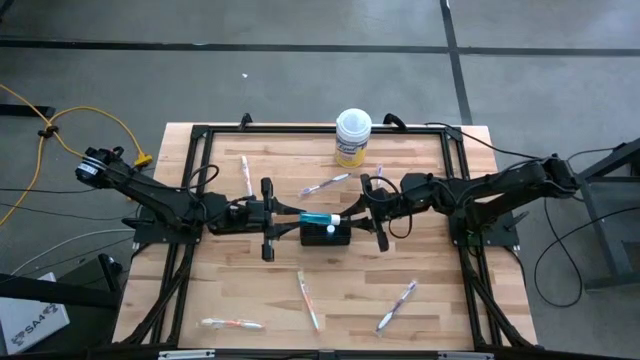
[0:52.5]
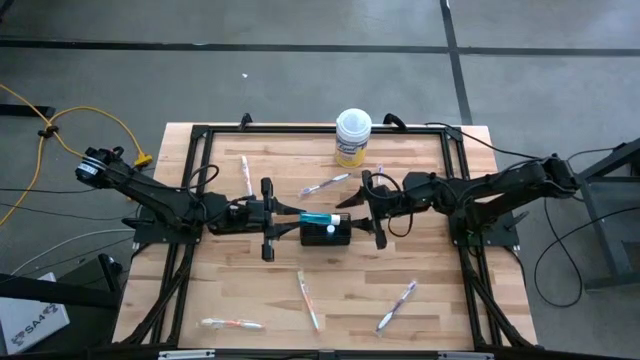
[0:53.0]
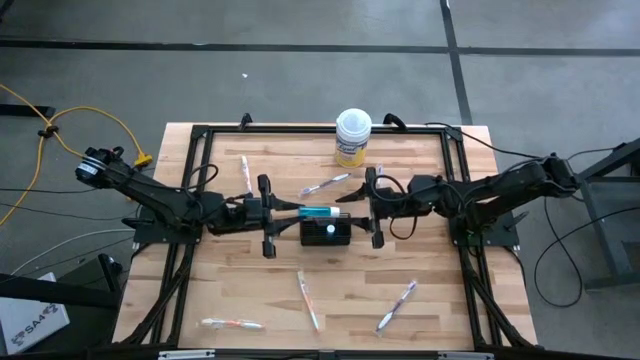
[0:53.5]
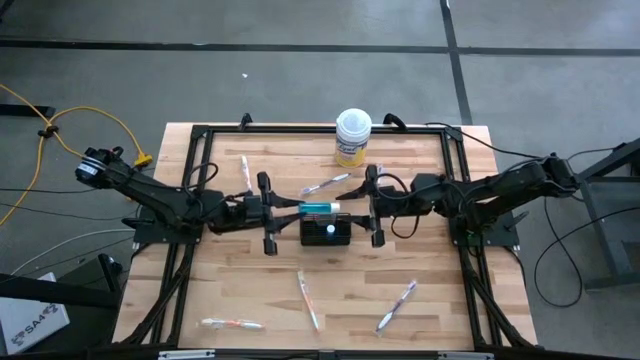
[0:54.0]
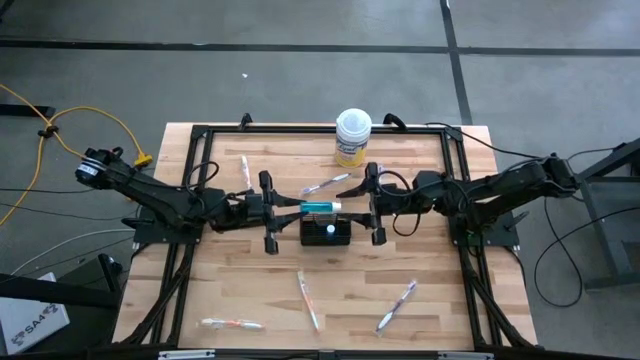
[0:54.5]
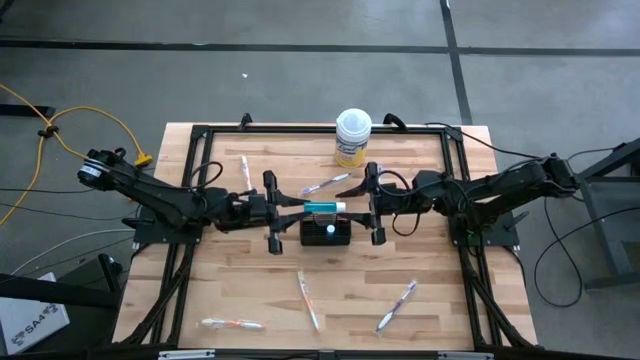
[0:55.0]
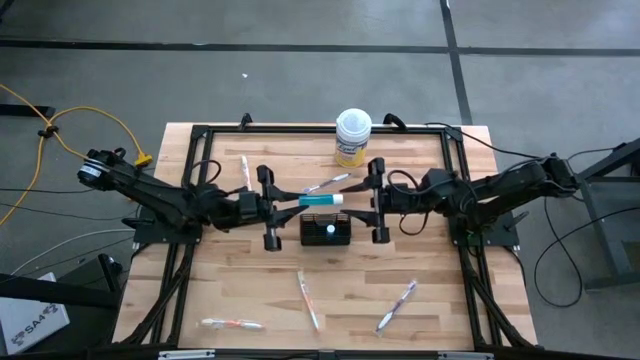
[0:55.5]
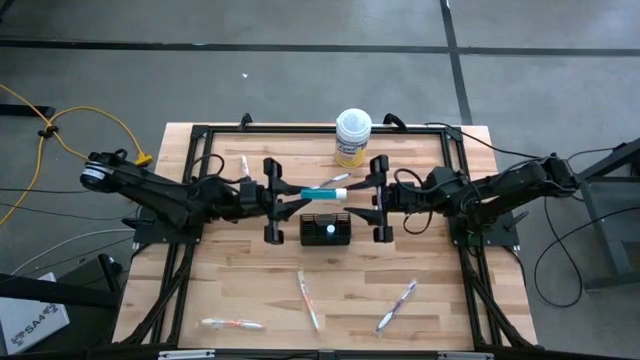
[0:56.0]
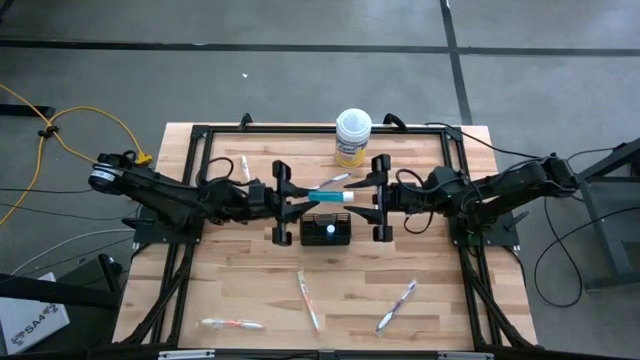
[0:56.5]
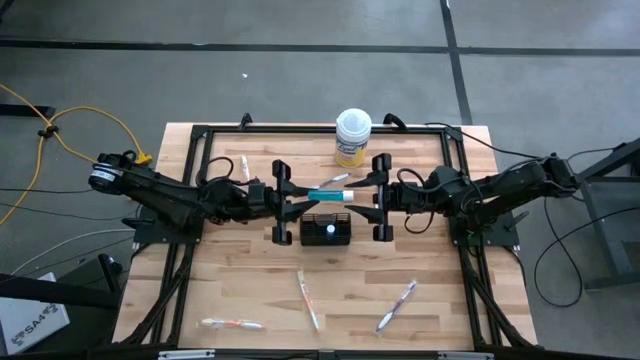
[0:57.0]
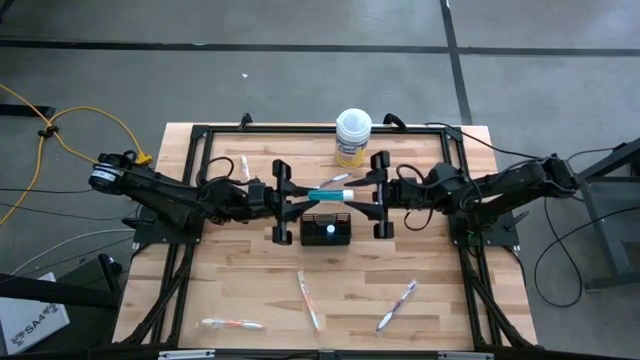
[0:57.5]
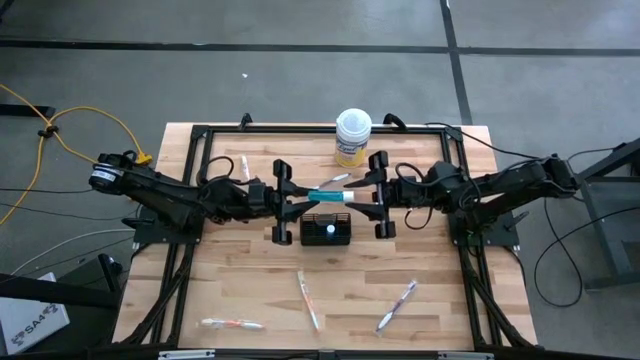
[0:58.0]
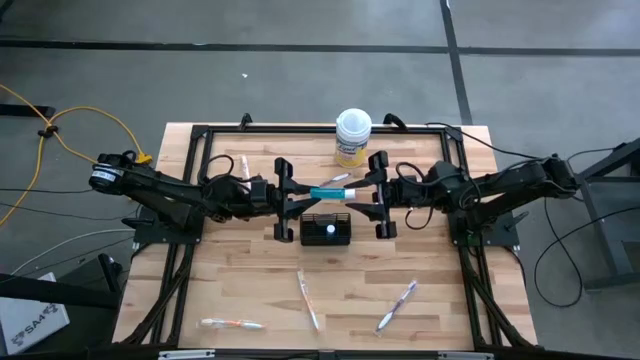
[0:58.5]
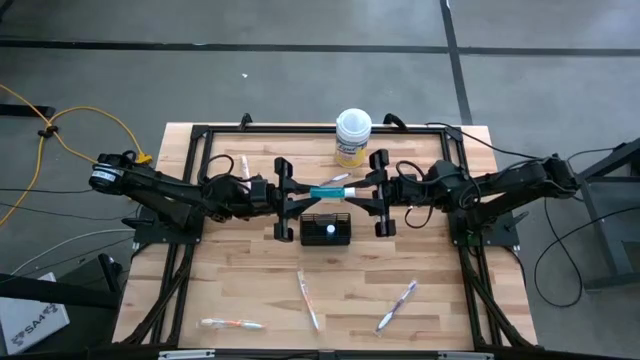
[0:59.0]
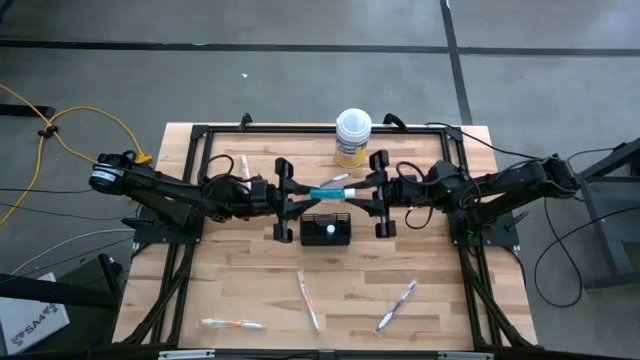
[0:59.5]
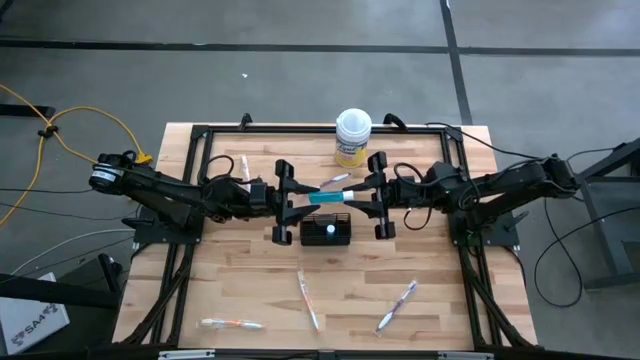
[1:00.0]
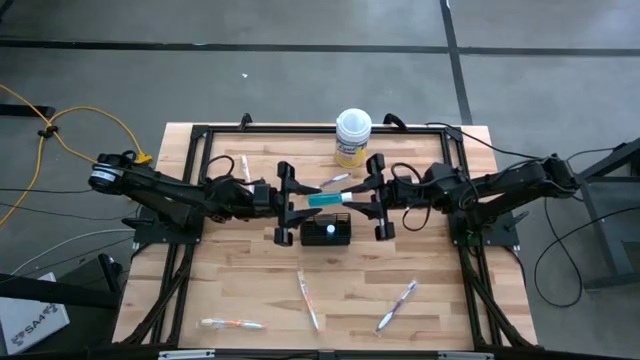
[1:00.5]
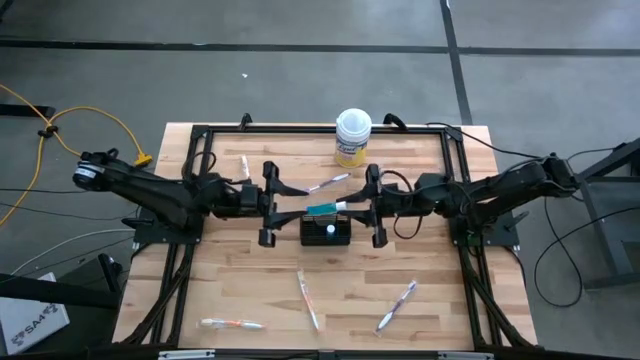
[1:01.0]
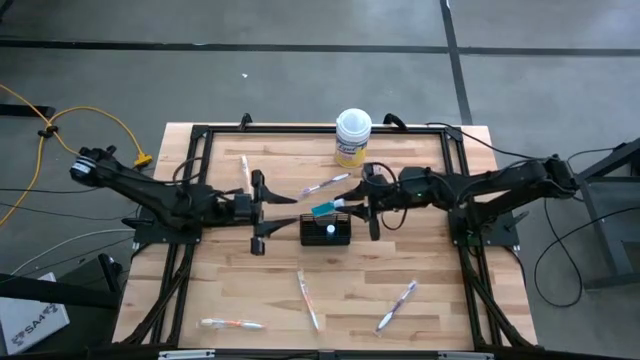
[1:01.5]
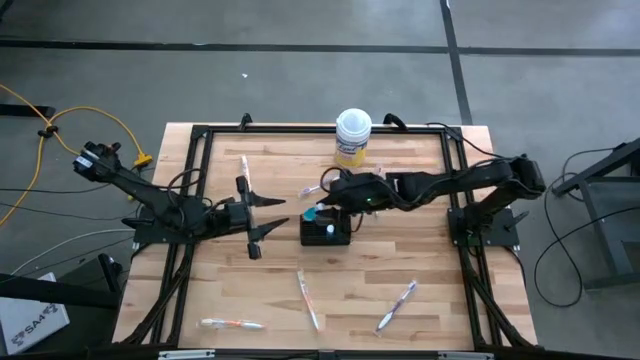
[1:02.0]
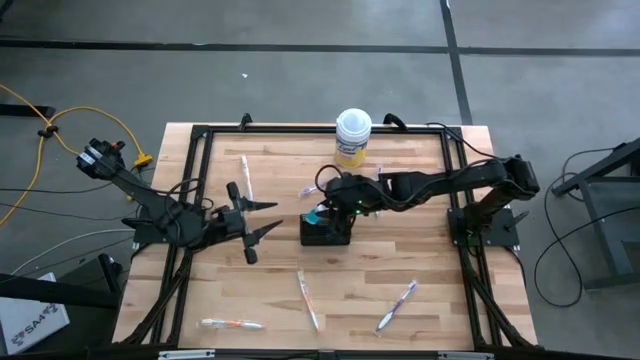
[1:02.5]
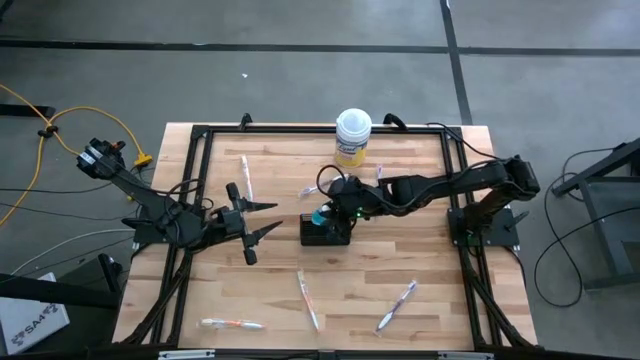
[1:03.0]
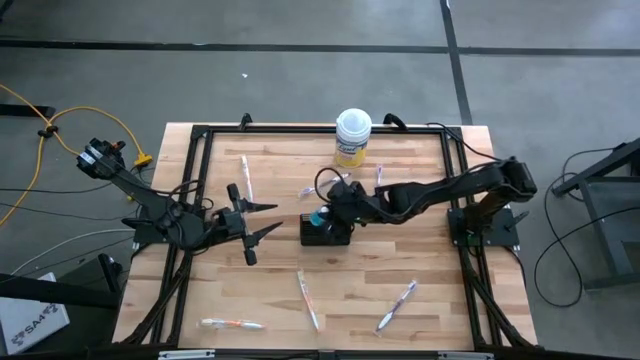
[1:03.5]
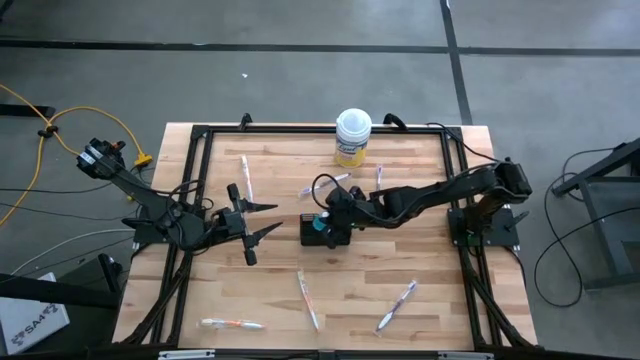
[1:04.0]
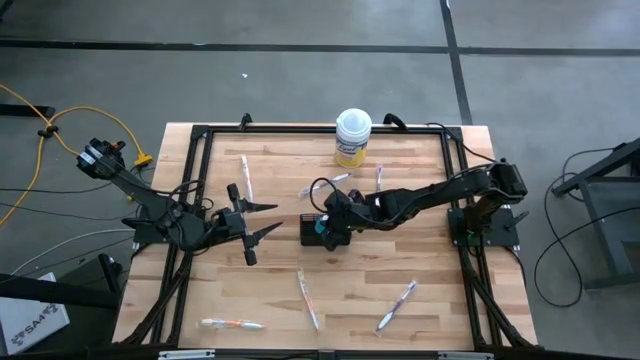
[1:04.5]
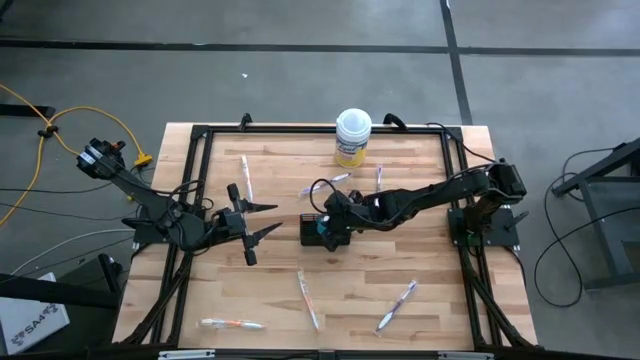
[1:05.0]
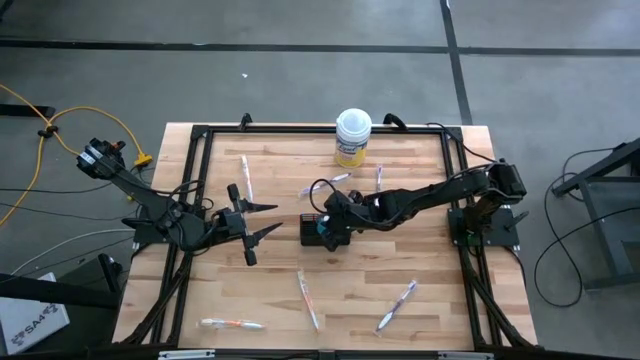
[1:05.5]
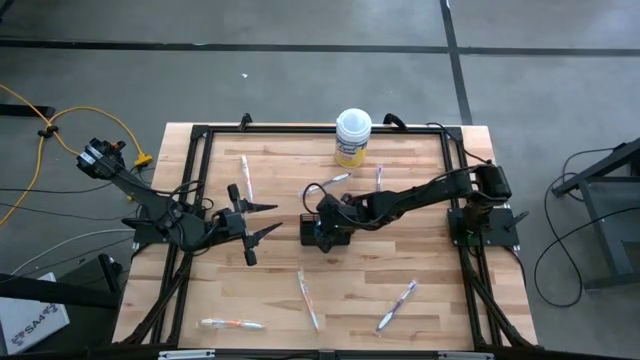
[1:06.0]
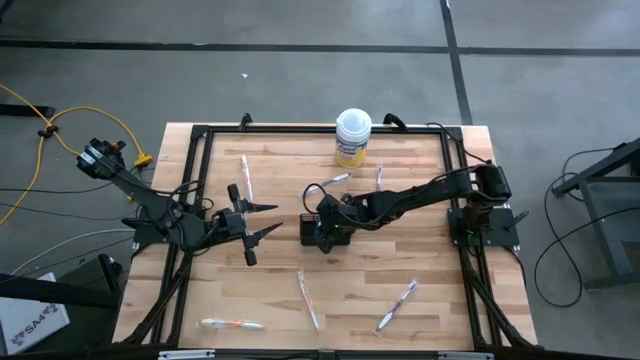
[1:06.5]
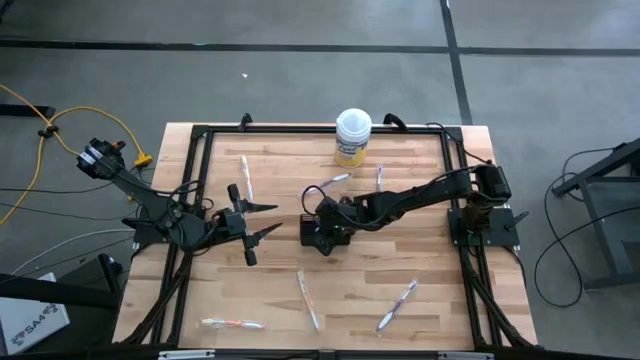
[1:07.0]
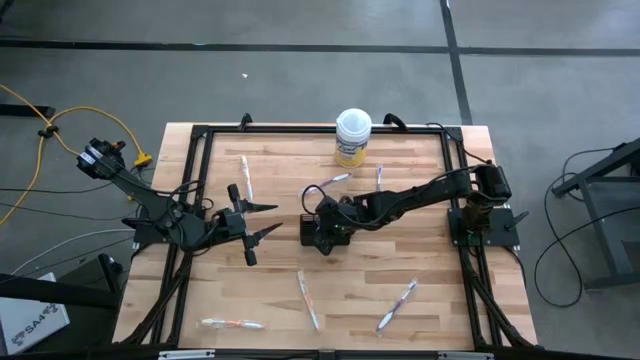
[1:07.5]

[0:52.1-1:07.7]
Task: Pick & Place toothbrushing station
Put the blue mouthwash into the wire organizer

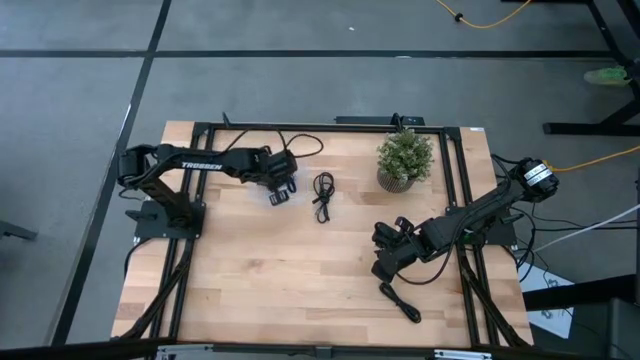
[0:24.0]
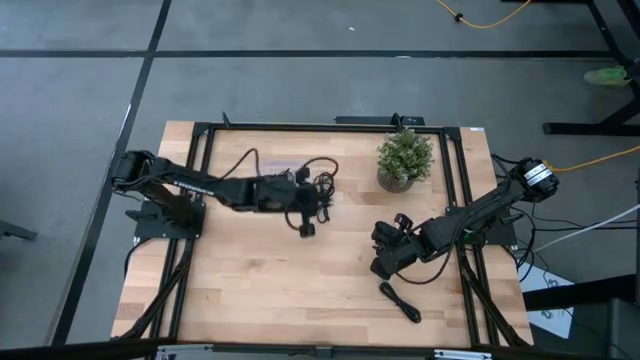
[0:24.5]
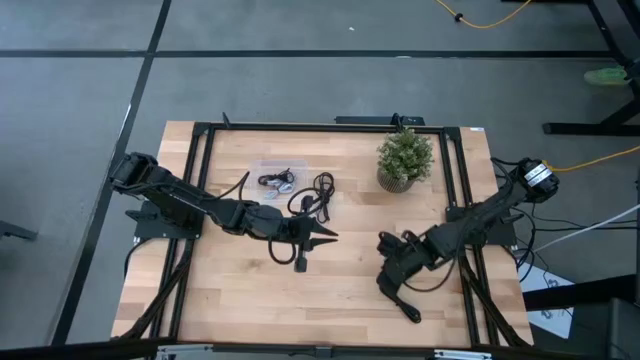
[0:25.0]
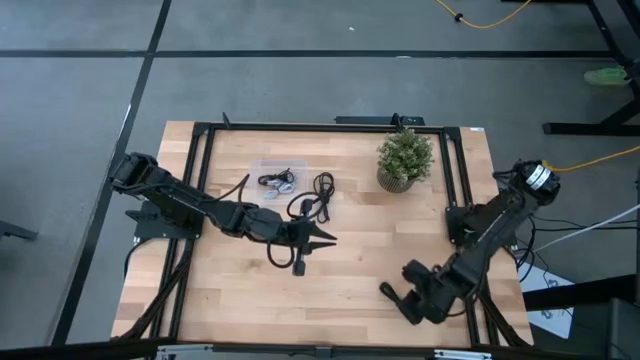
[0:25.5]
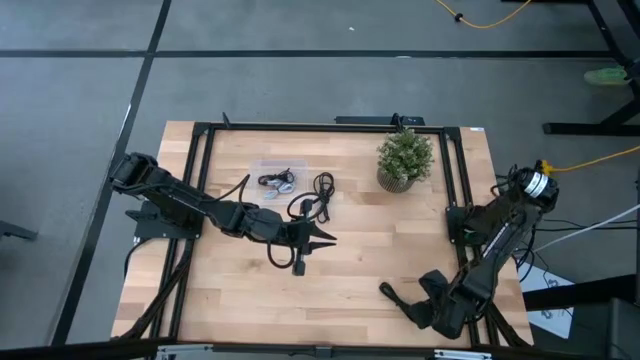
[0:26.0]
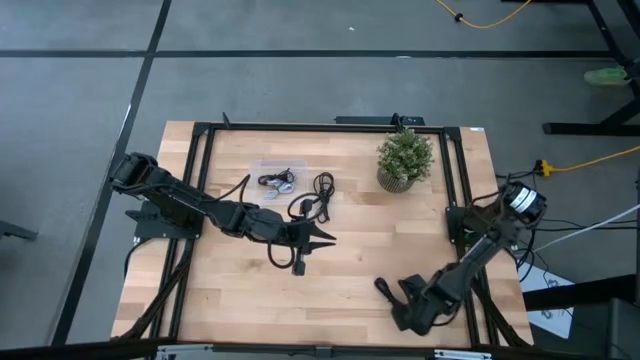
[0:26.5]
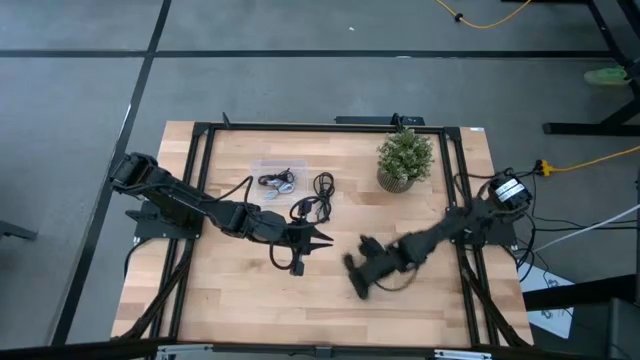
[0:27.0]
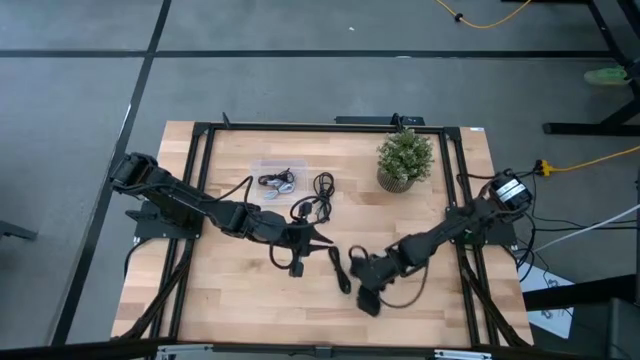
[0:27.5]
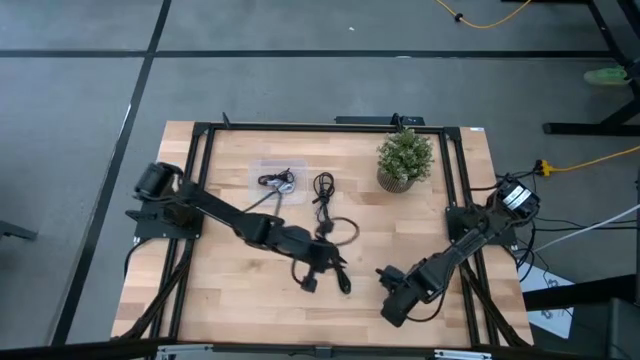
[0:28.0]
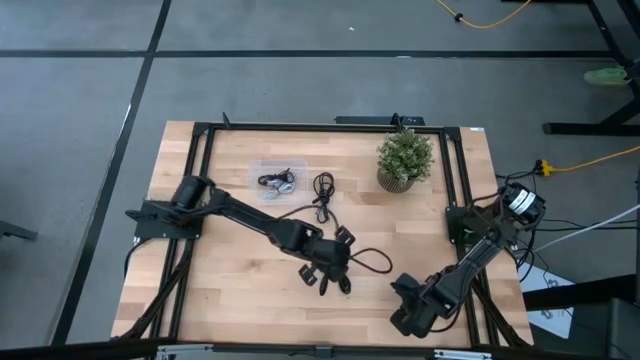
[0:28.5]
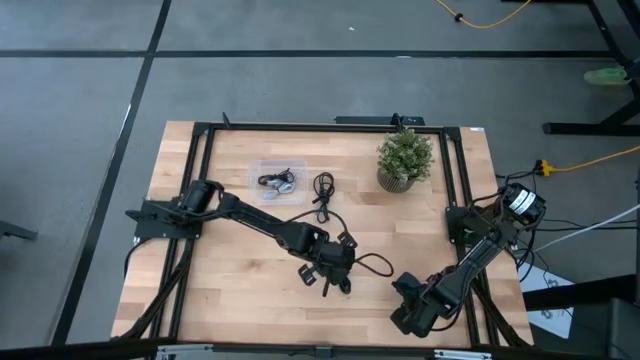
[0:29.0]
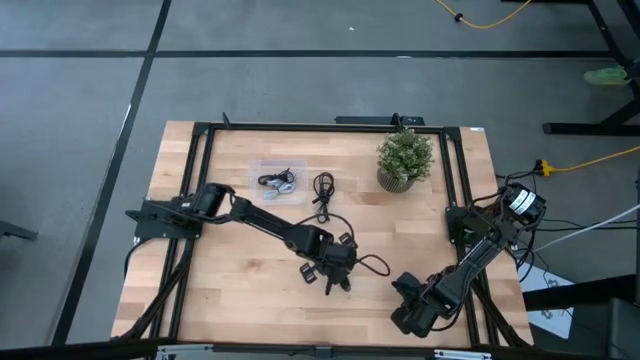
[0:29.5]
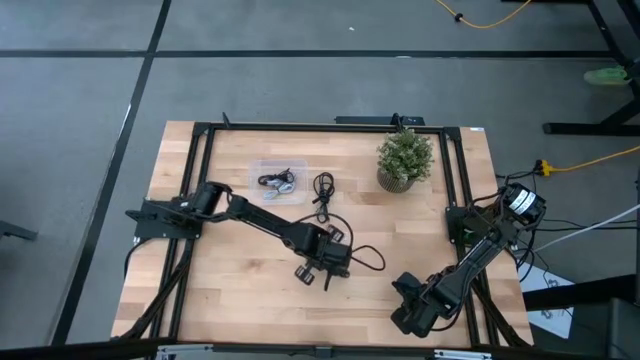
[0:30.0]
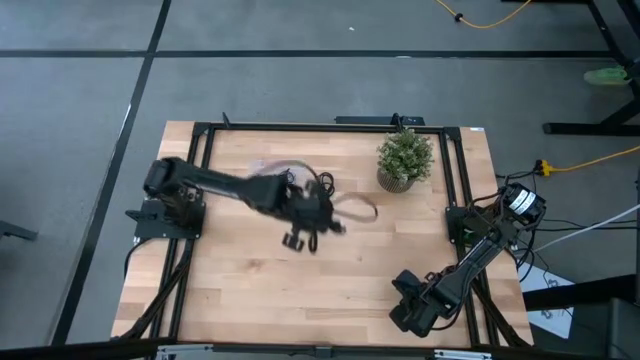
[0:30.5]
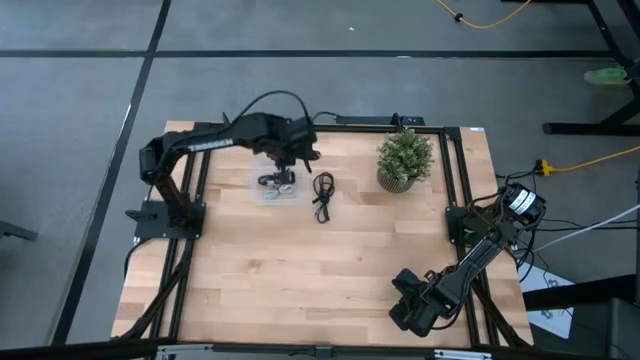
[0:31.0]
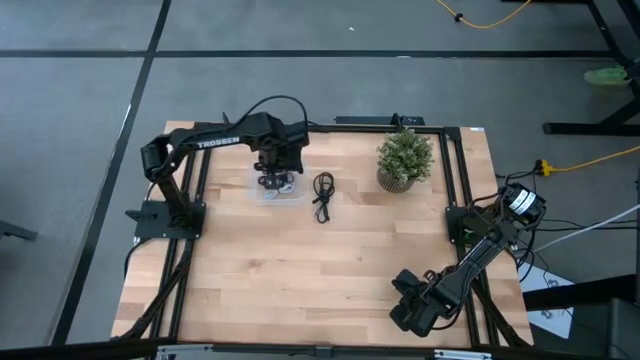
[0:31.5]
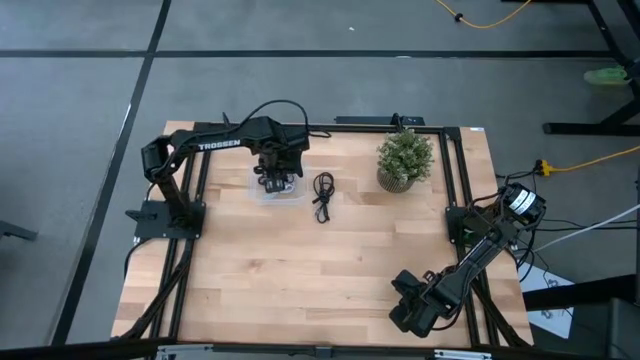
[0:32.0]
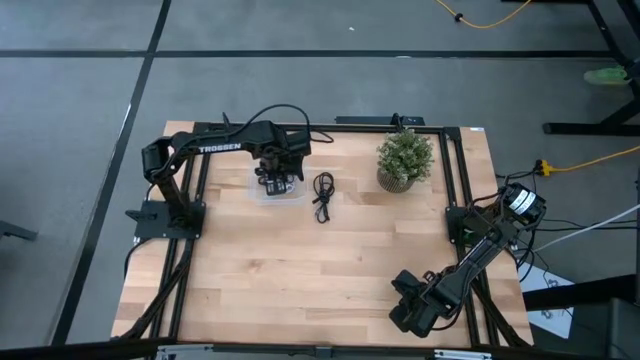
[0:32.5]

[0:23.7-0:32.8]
Task: Pick and place USB-C Cables
Put the bottom black USB cable into the transparent bin
